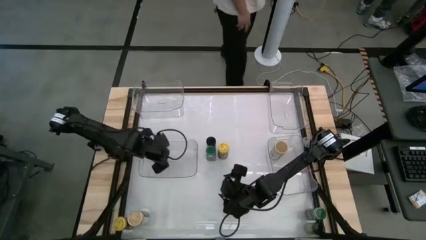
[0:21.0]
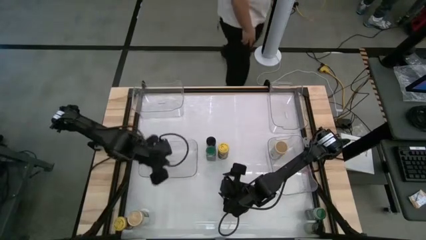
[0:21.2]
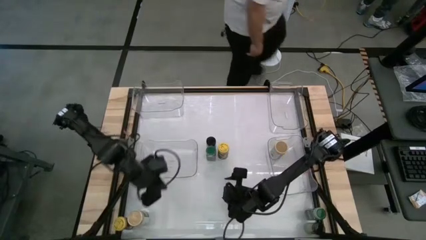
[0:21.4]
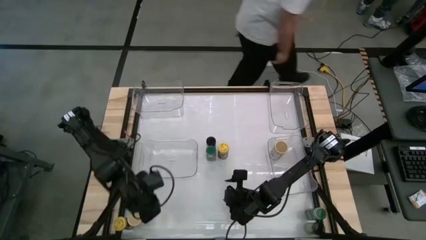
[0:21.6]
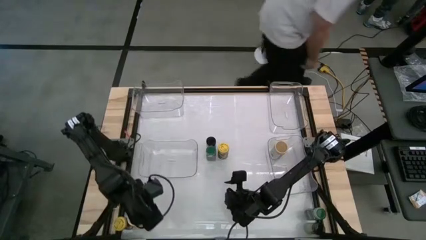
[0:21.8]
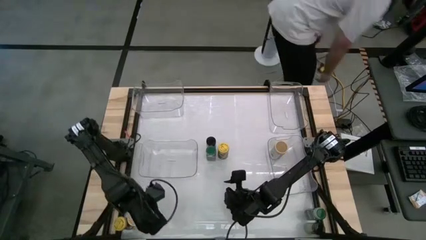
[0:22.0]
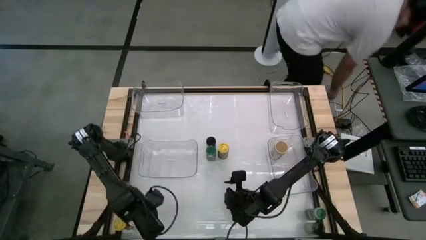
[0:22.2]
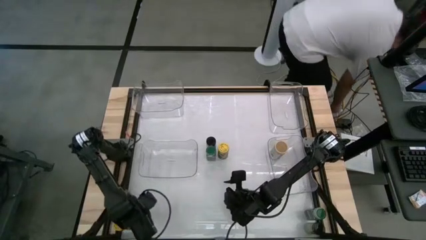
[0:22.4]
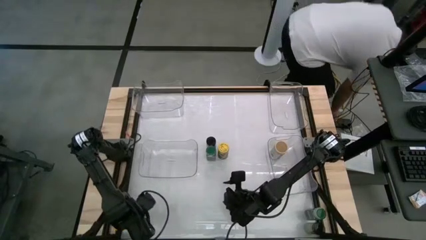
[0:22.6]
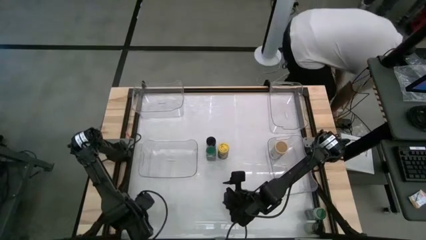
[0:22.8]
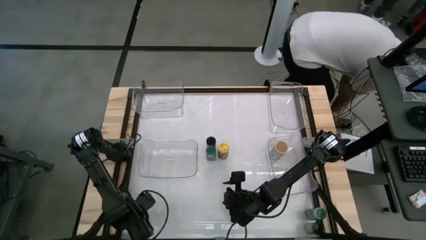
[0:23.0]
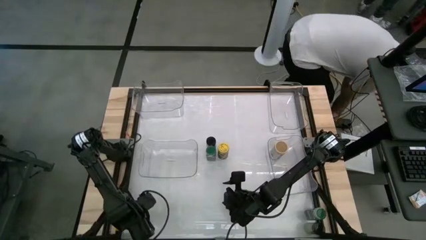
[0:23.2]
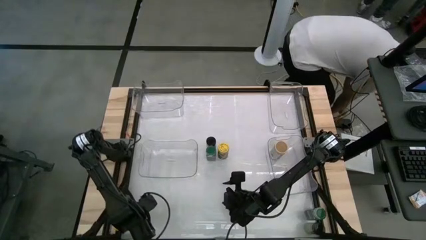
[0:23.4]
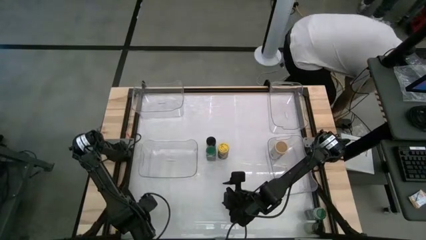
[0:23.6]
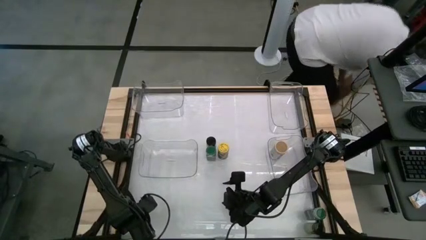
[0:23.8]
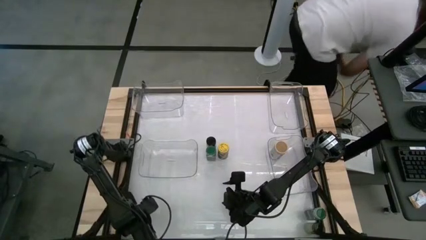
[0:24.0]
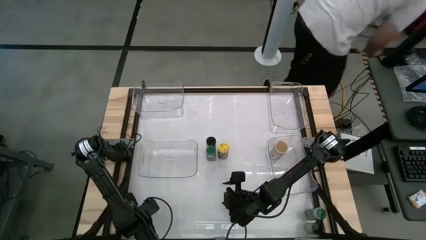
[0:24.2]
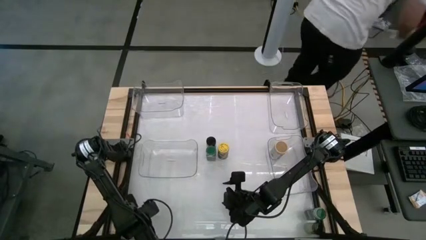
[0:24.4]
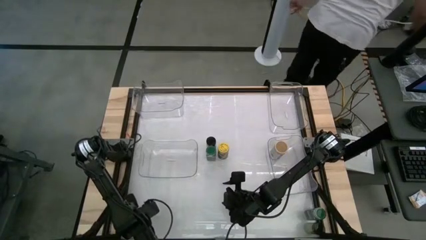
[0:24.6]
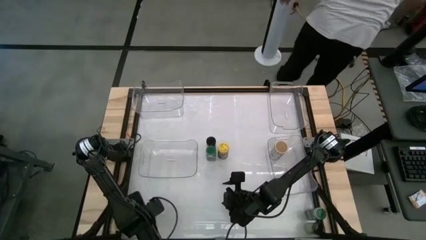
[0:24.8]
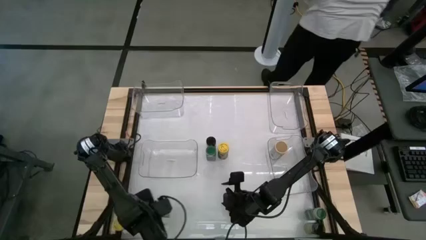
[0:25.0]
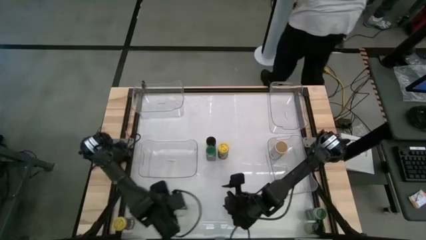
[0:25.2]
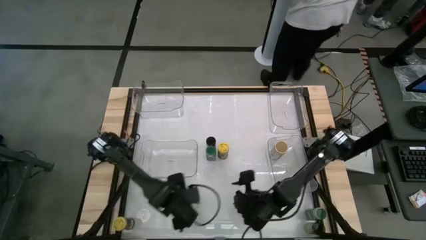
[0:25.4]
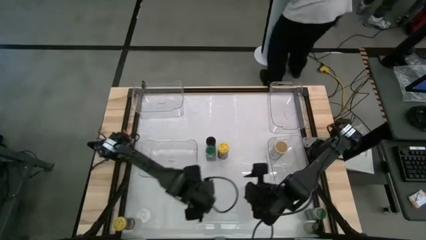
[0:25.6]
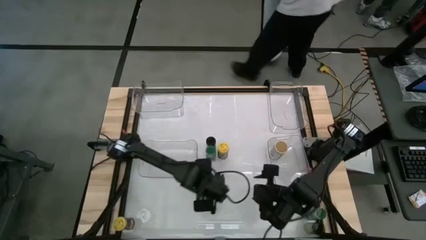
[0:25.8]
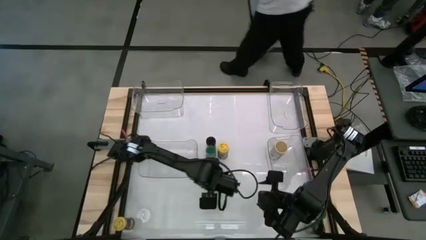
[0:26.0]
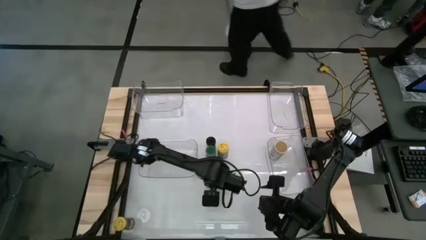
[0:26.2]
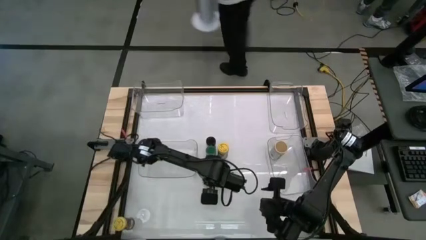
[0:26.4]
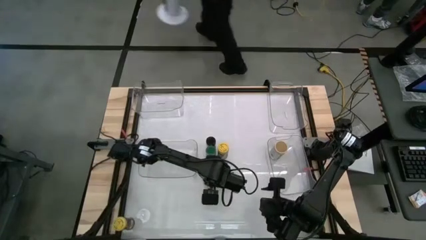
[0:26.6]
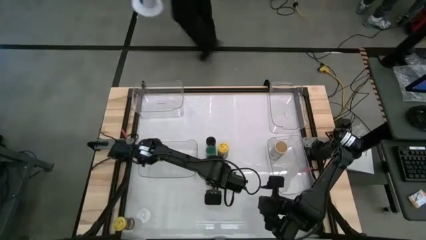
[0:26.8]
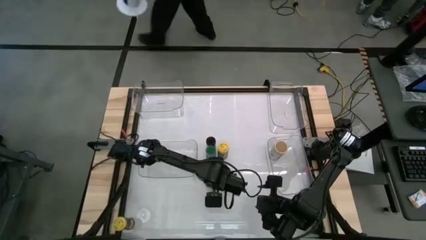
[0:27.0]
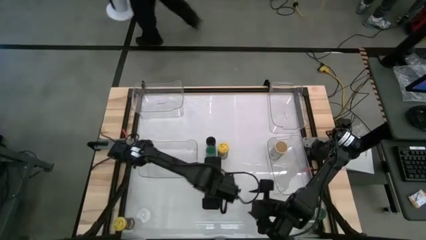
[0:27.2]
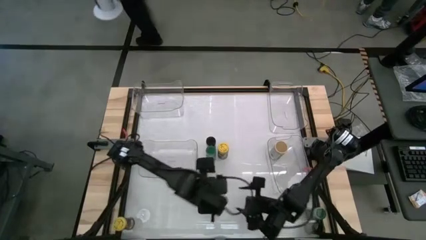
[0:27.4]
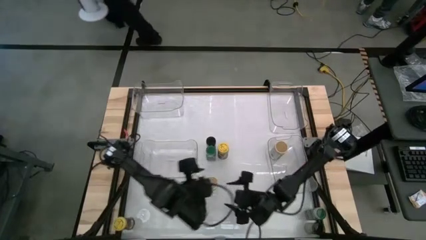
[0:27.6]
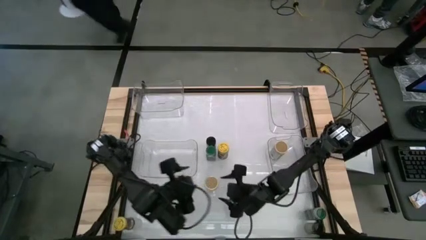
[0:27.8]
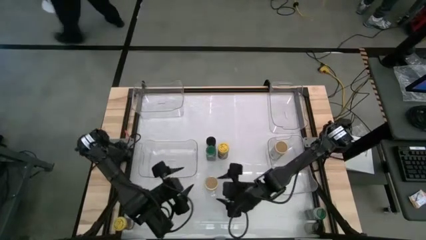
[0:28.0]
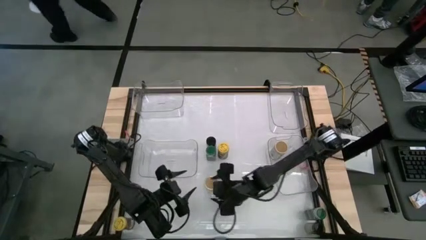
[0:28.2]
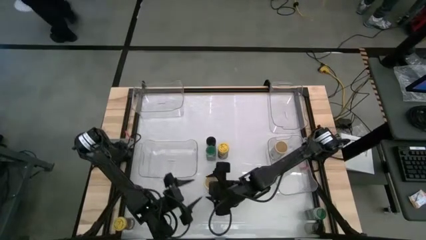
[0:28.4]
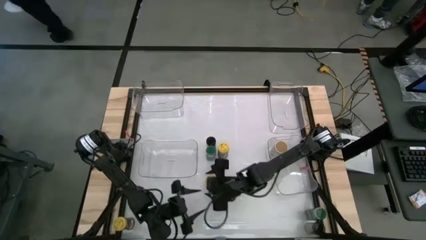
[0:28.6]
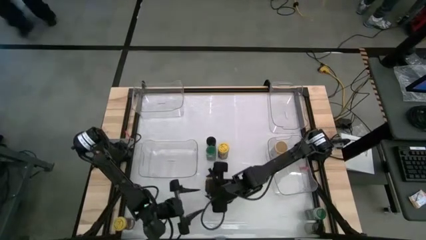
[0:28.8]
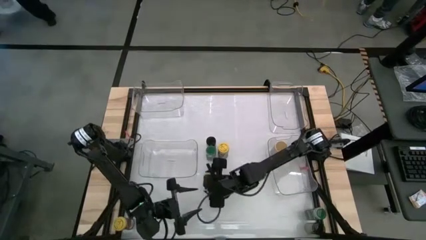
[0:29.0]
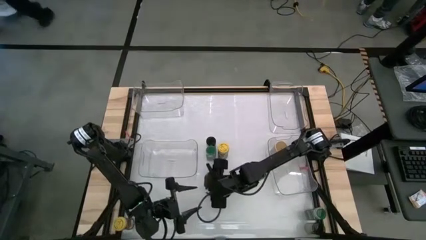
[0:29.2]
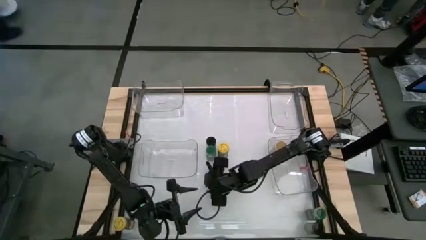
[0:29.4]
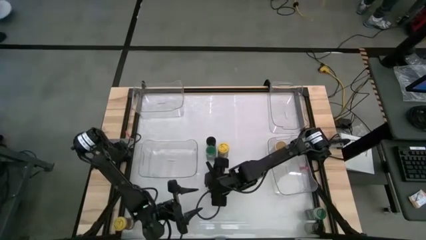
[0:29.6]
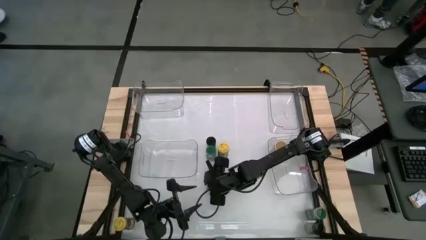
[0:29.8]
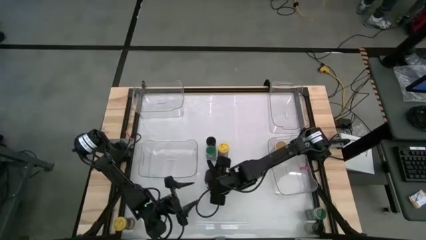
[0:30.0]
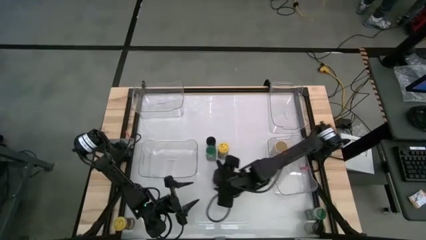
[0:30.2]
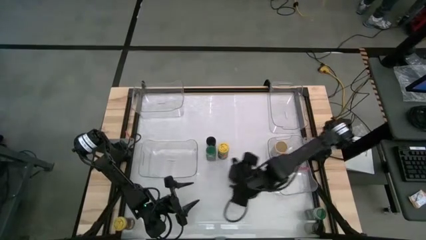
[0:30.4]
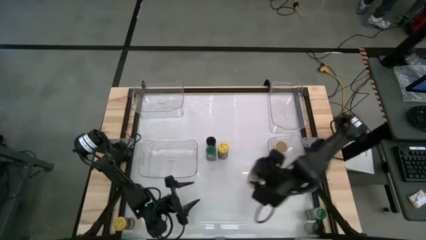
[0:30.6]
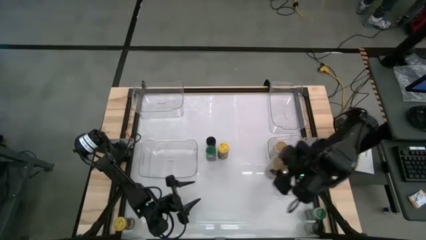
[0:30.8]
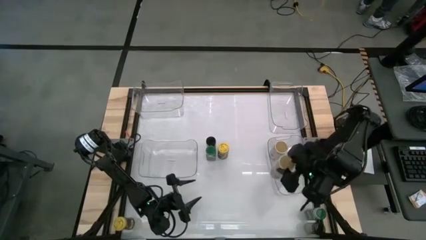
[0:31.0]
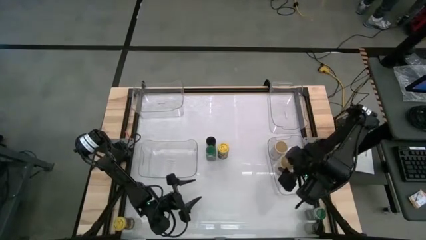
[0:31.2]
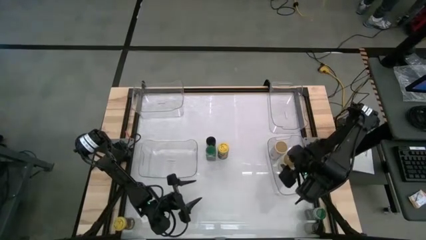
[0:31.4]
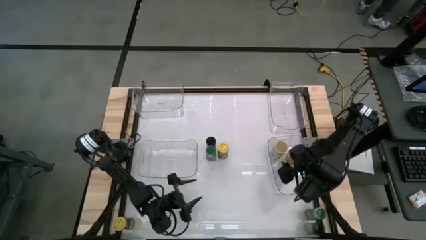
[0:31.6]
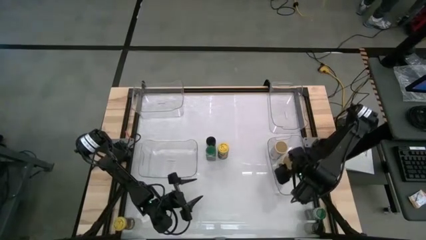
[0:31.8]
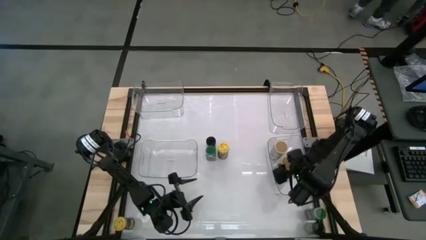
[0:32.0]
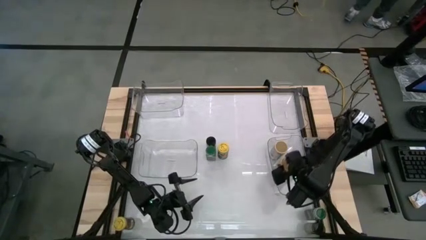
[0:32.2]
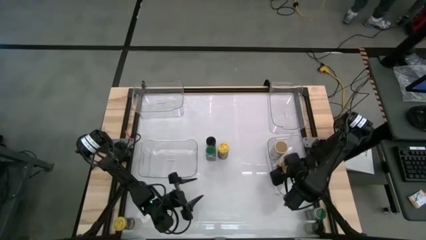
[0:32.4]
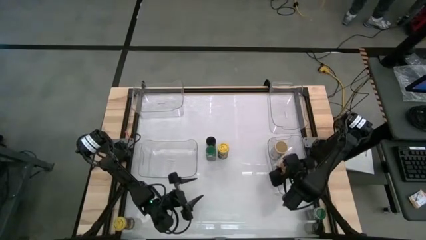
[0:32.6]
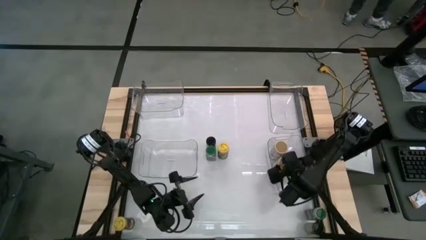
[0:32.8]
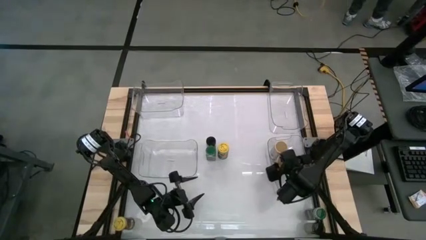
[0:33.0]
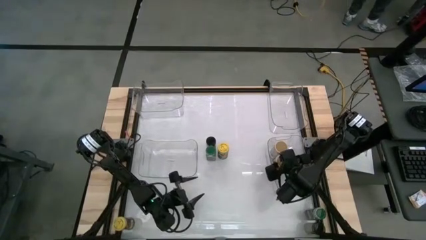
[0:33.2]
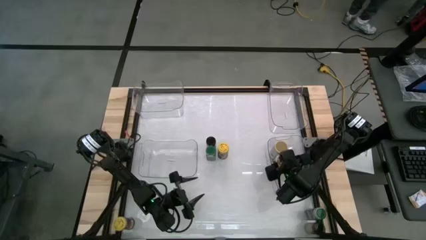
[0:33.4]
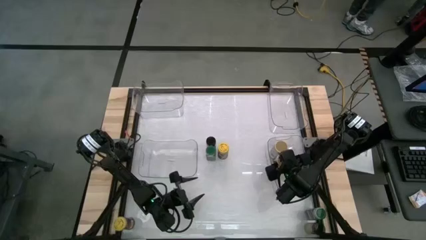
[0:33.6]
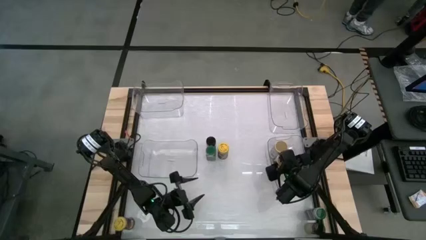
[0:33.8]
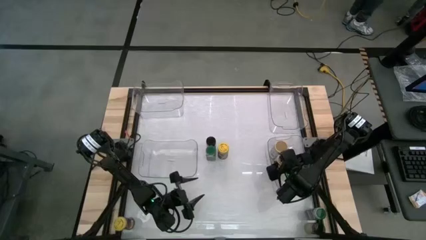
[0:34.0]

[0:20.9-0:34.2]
Task: Sort spices by type
Put the gold spice bottle into the bottom right transparent bin

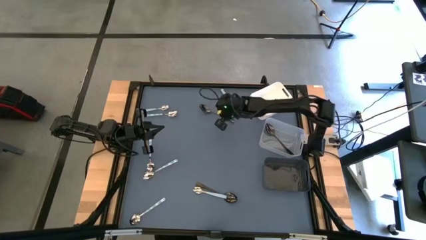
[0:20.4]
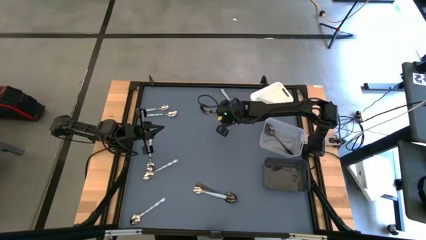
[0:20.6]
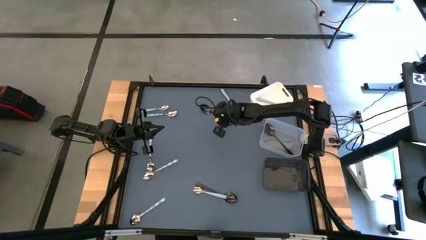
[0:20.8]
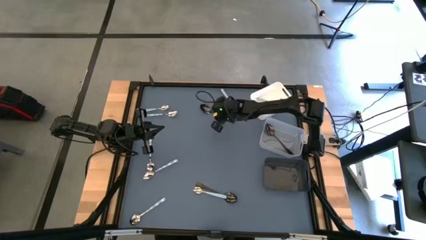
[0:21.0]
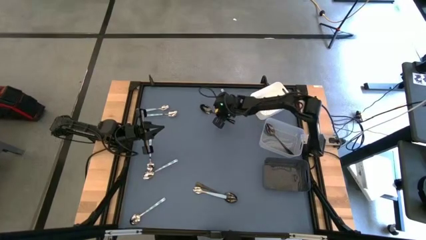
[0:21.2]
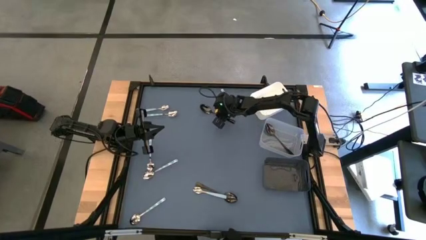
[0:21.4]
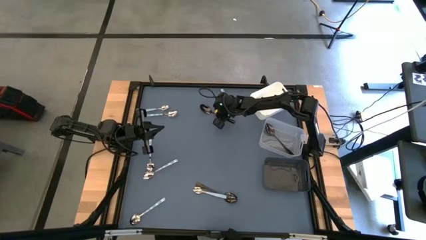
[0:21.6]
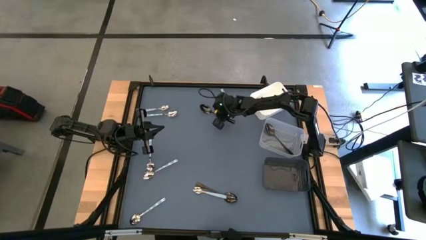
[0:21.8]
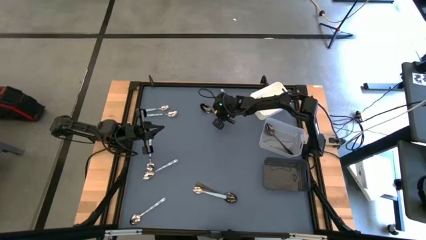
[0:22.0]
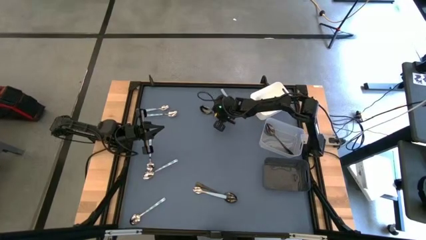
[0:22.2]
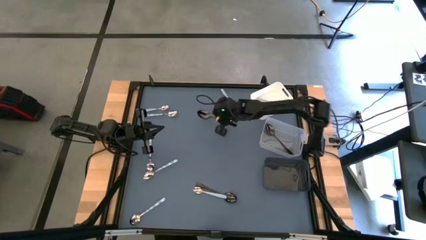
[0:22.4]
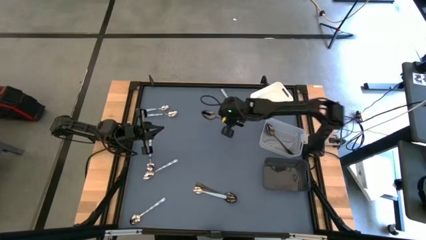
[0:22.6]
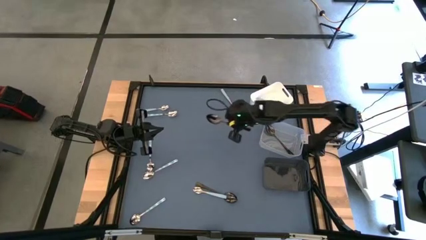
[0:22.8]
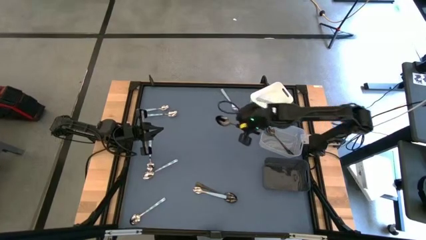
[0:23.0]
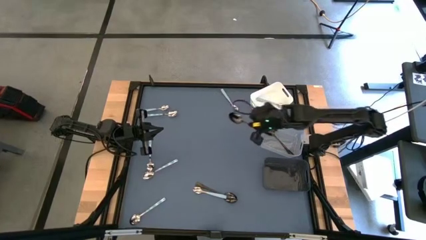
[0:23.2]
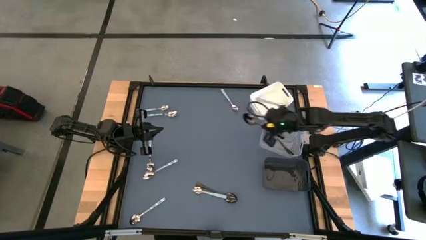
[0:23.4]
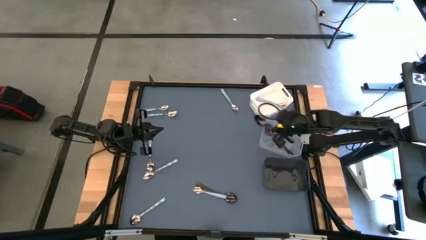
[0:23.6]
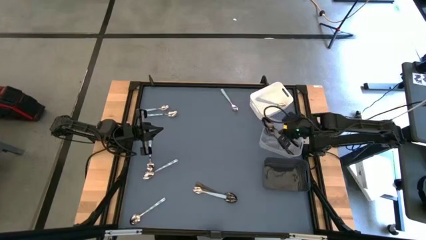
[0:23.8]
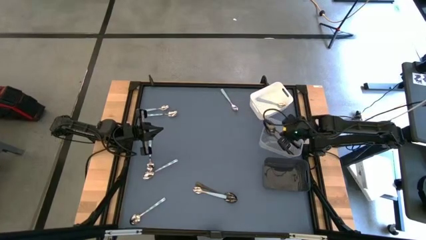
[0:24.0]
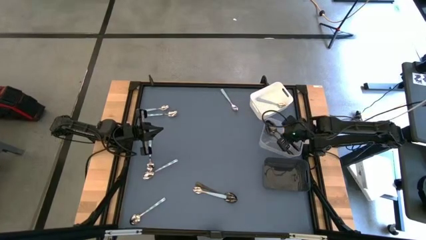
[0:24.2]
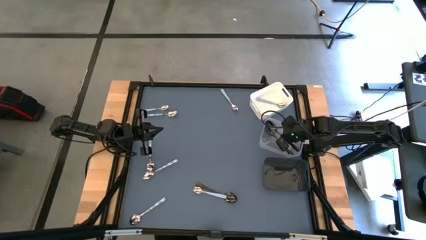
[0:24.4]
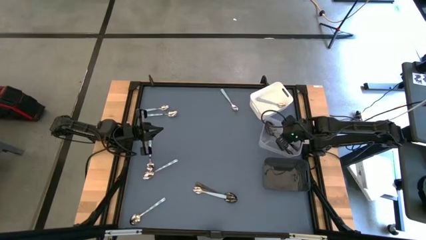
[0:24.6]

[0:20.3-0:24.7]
Task: Sort silverware by color (type)
Put the black spoon into the transparent bin
